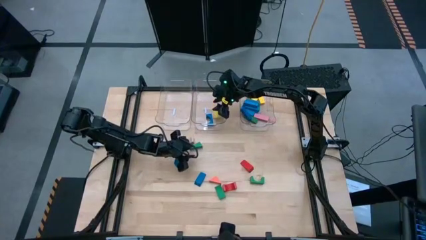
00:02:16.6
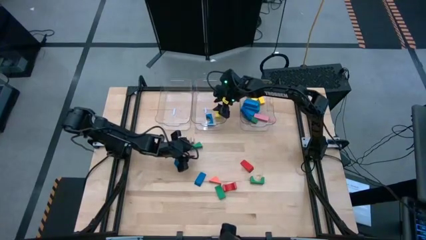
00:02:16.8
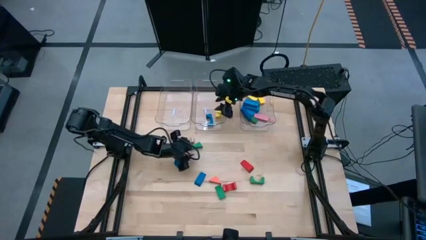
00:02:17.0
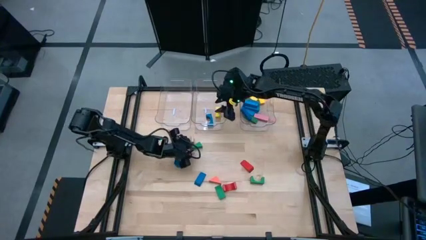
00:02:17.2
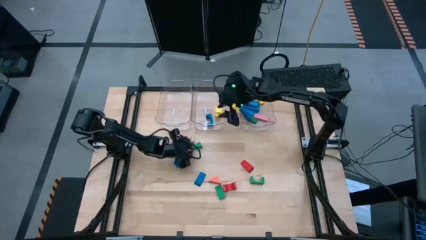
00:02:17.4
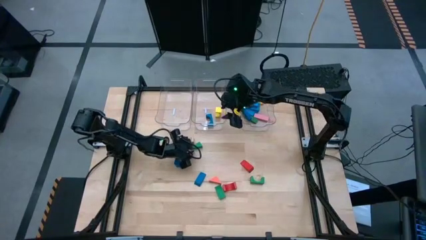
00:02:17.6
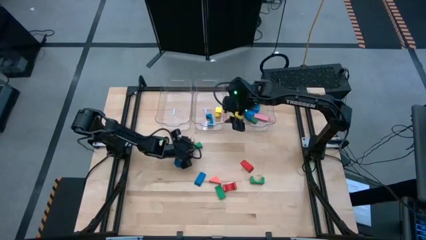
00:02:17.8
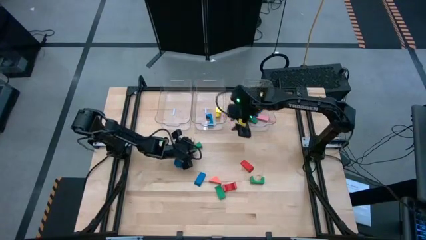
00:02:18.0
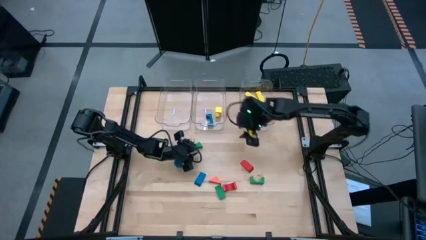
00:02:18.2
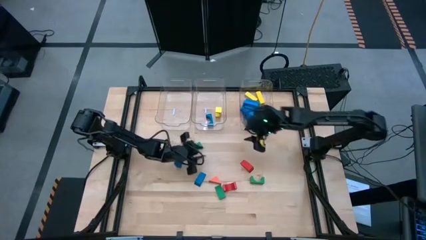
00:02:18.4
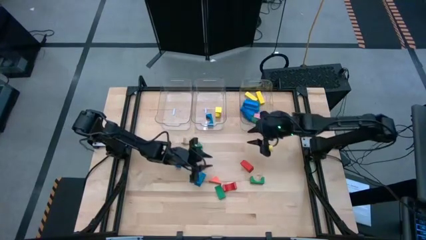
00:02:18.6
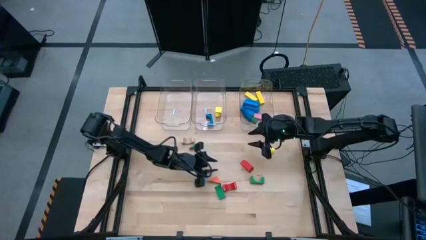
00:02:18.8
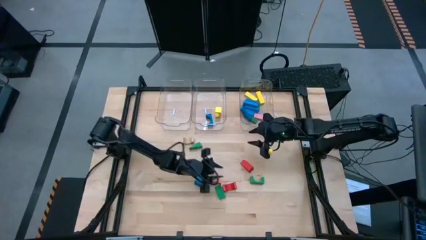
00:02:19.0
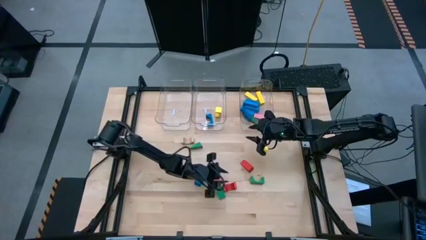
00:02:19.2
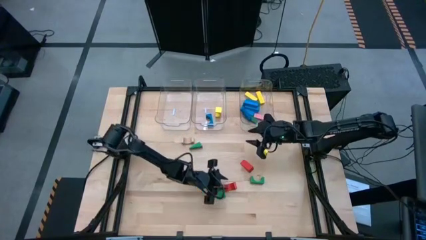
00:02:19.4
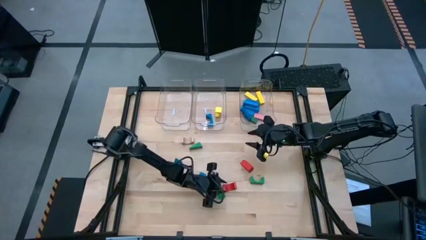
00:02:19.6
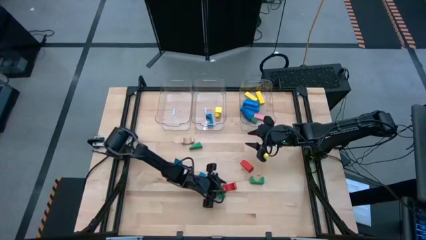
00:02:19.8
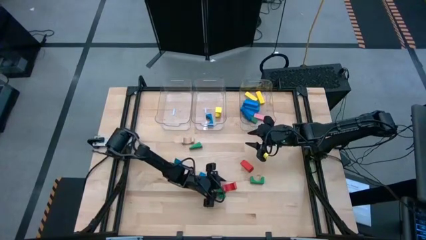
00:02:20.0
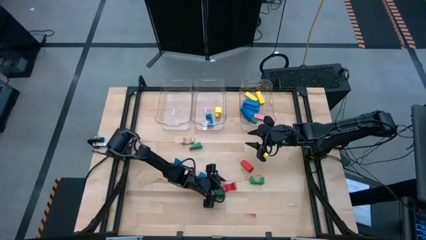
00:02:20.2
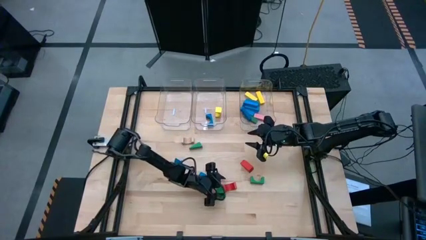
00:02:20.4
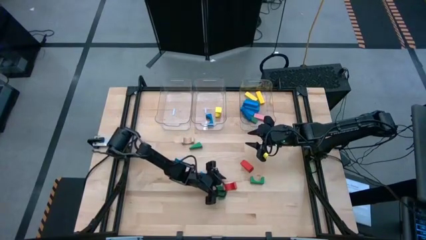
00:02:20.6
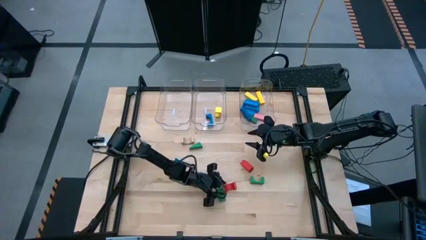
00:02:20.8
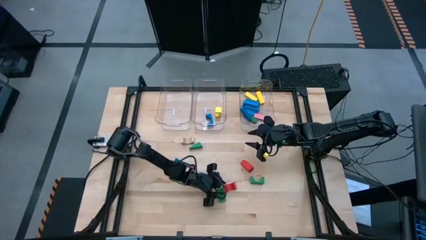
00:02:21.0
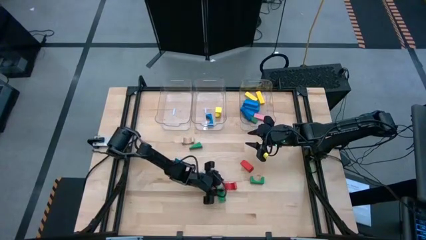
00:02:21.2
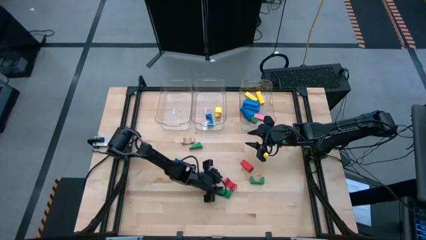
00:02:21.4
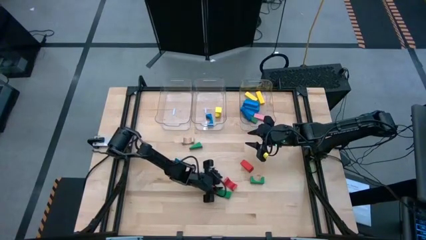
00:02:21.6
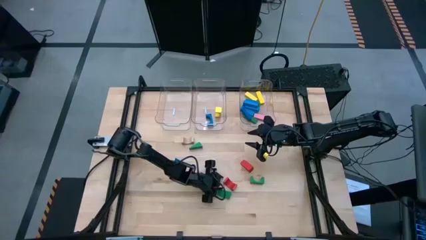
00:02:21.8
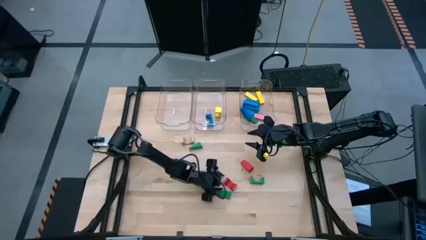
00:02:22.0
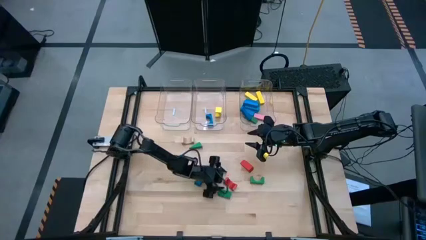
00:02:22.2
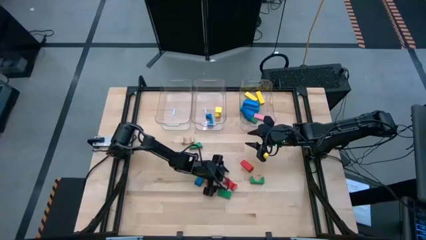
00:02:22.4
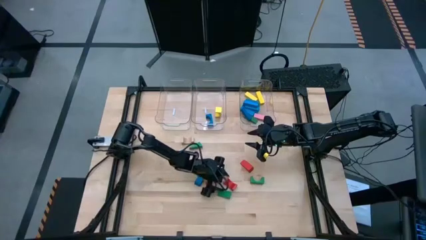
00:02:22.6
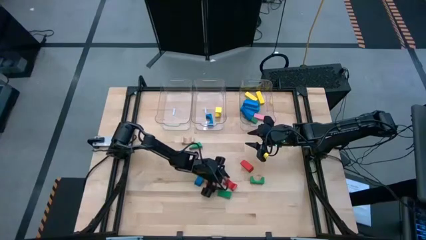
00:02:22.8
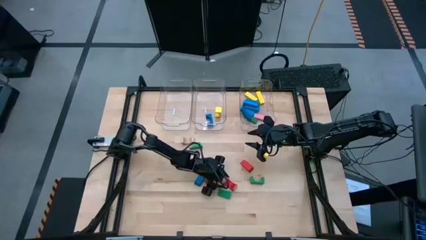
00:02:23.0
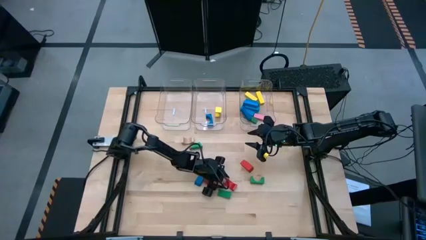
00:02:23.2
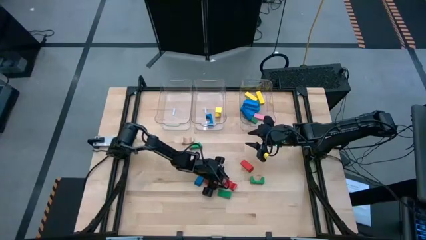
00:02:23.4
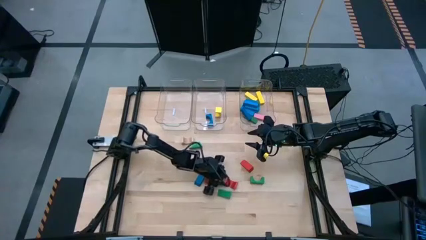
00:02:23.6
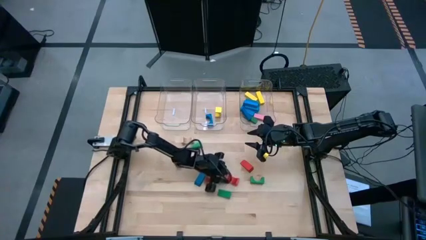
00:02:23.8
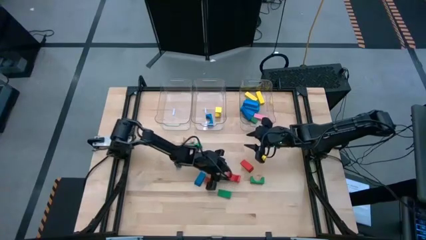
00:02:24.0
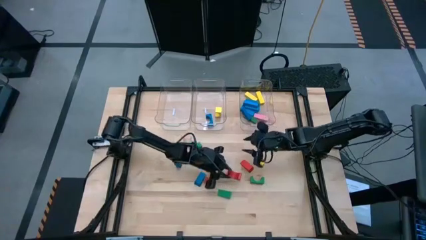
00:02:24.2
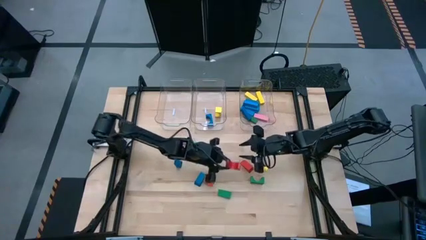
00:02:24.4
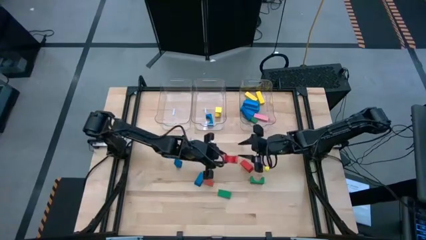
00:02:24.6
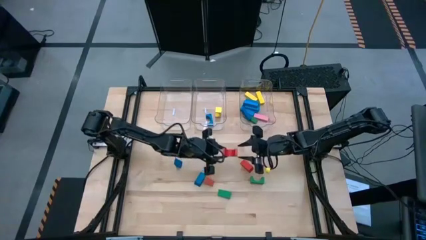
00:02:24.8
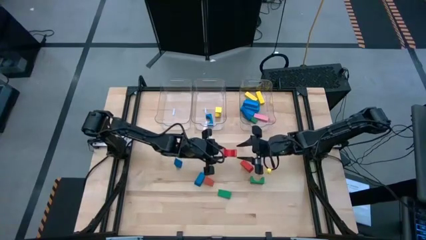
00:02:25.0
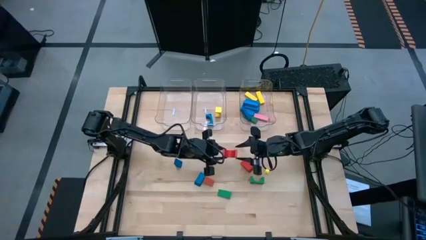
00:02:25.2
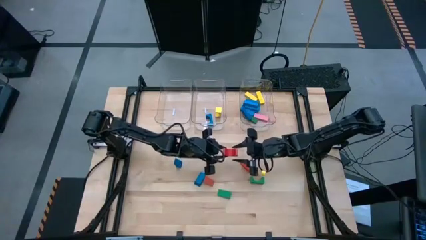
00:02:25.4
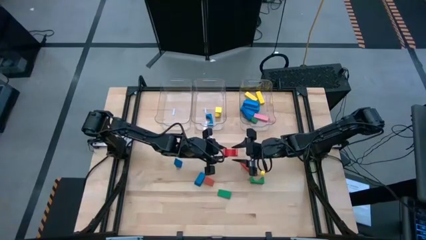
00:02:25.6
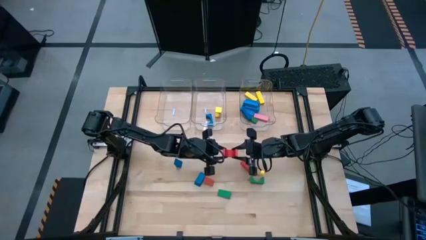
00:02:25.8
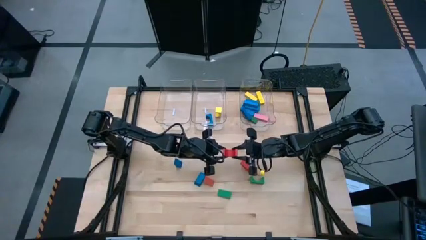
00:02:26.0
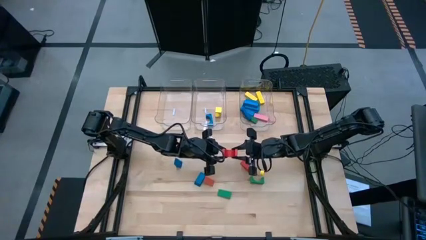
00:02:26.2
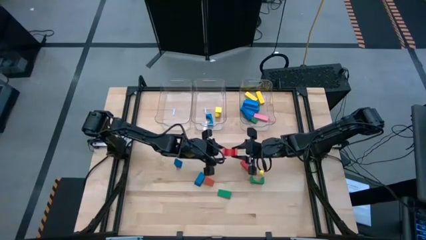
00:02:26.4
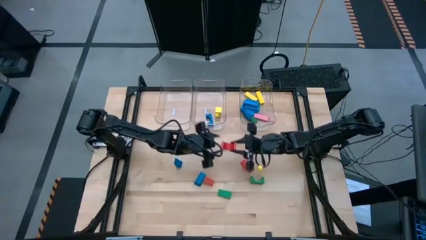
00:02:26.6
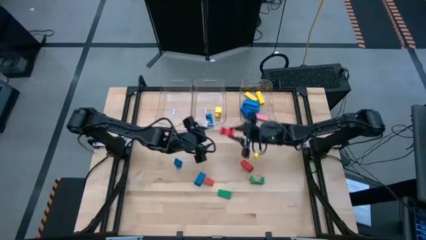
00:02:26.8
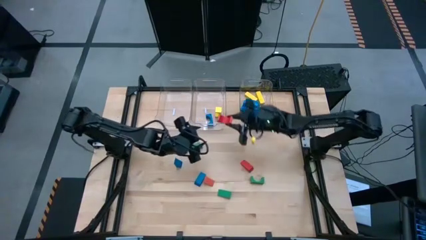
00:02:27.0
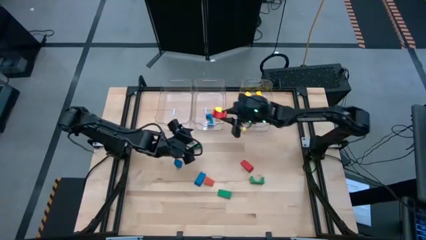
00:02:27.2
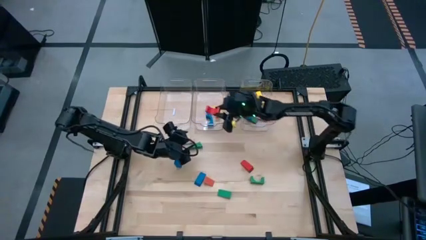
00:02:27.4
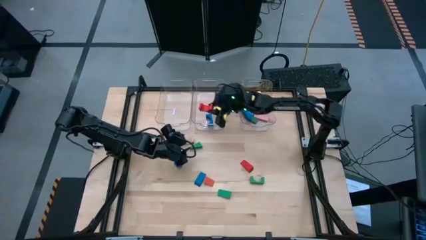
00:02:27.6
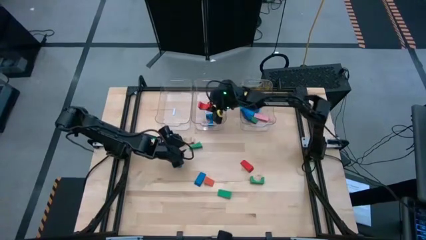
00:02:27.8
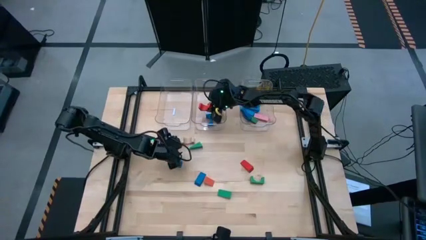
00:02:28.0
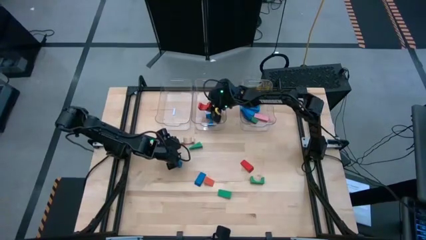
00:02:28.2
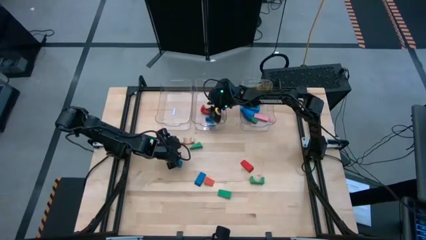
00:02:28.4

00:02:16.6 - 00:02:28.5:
Task: Sort blocks by size
Put the red arch block into the center transparent bin

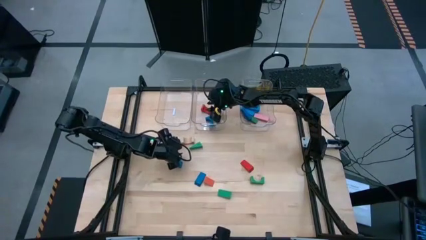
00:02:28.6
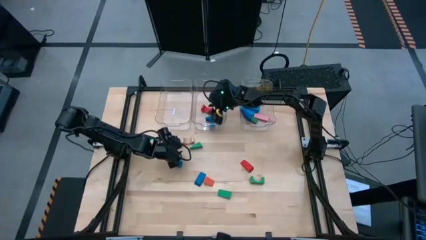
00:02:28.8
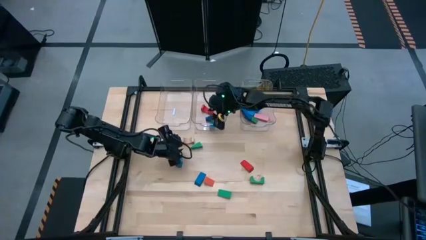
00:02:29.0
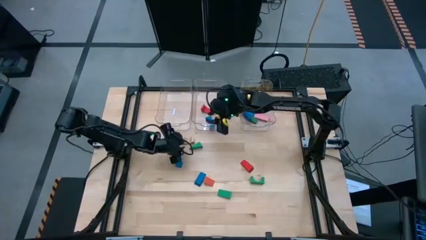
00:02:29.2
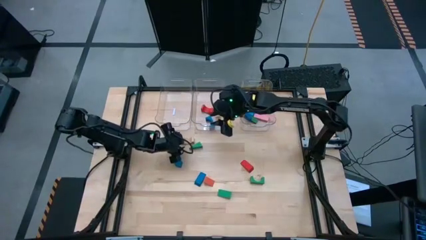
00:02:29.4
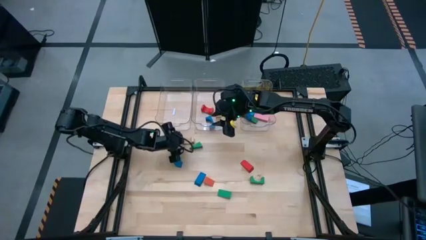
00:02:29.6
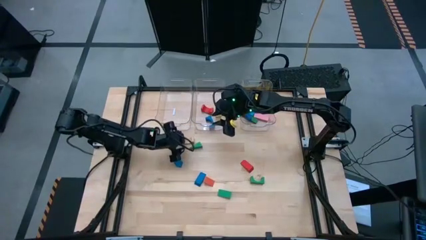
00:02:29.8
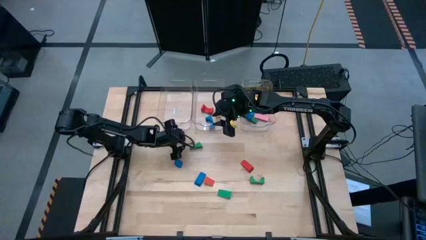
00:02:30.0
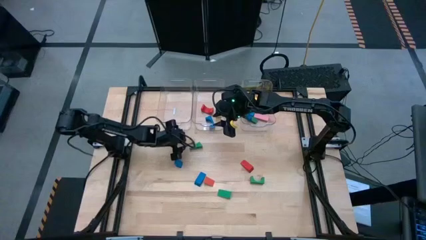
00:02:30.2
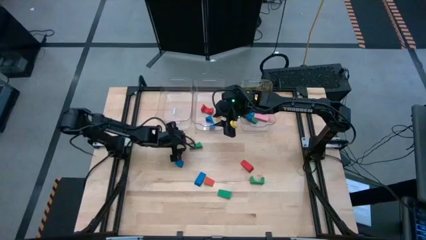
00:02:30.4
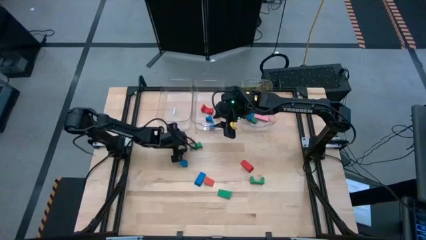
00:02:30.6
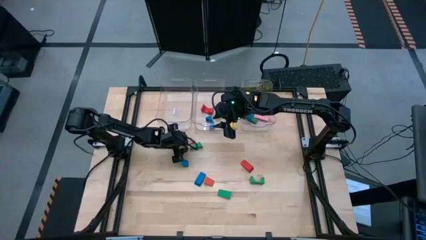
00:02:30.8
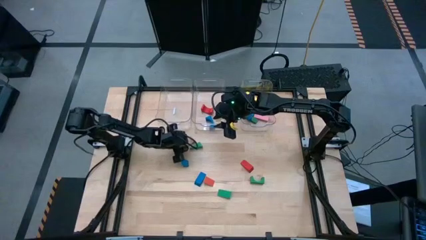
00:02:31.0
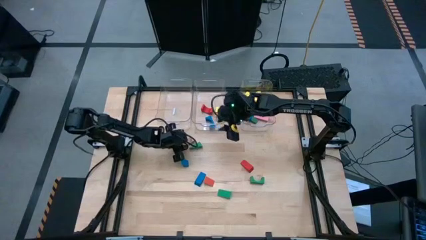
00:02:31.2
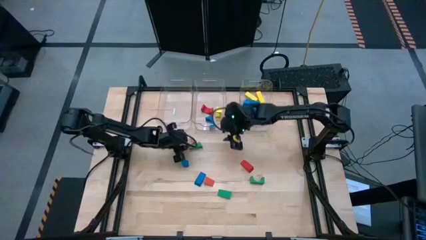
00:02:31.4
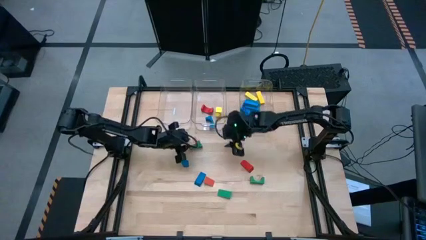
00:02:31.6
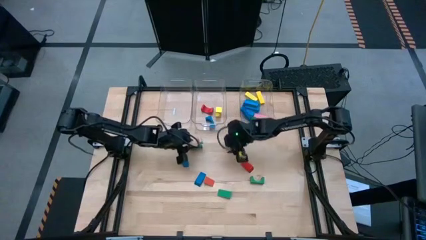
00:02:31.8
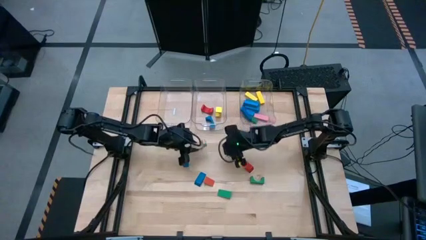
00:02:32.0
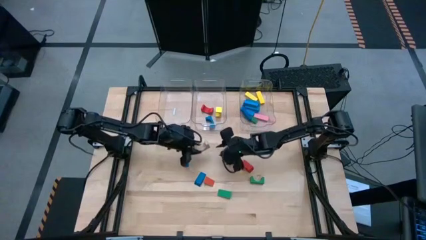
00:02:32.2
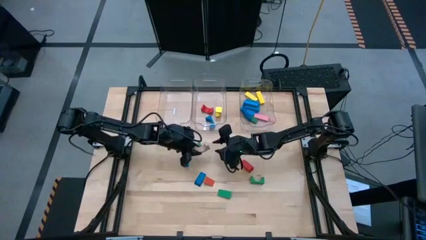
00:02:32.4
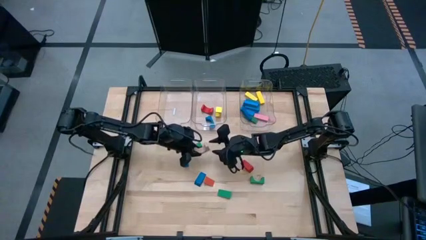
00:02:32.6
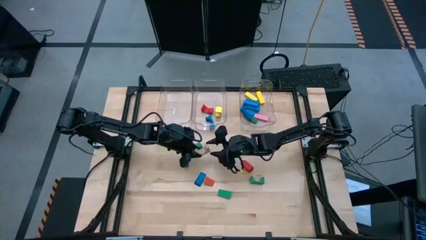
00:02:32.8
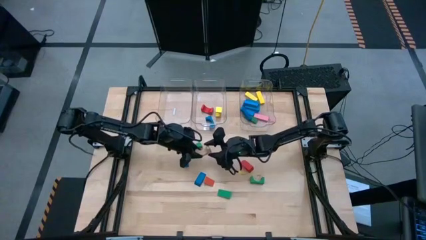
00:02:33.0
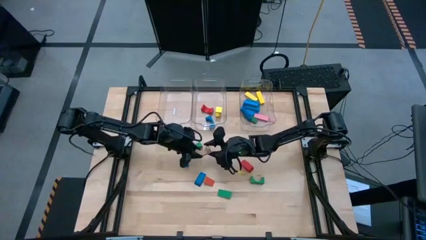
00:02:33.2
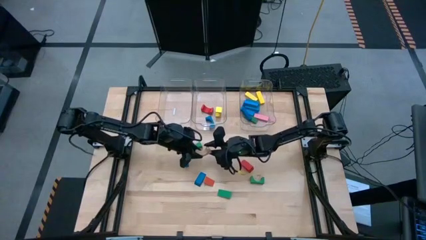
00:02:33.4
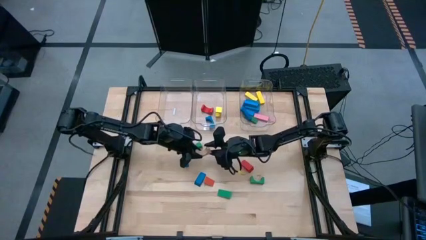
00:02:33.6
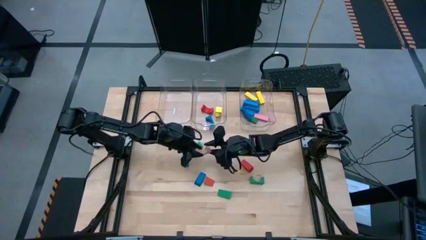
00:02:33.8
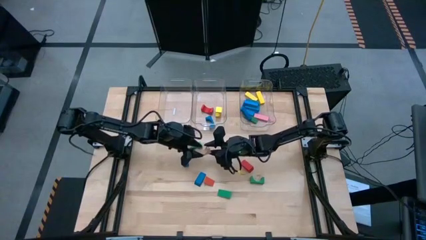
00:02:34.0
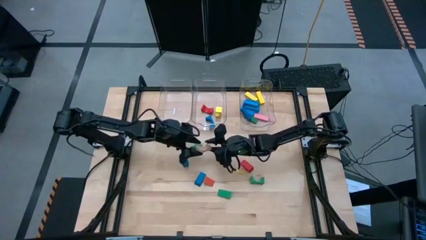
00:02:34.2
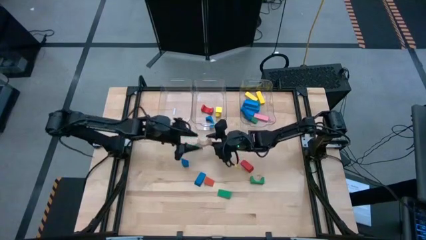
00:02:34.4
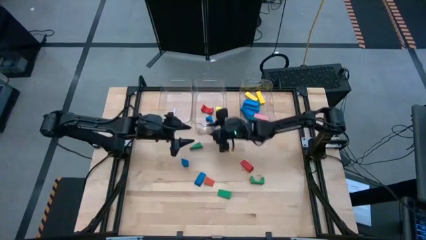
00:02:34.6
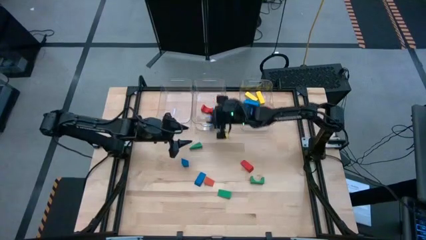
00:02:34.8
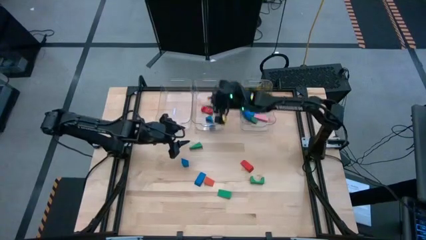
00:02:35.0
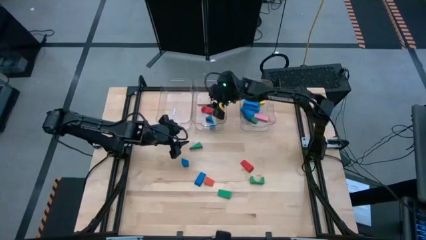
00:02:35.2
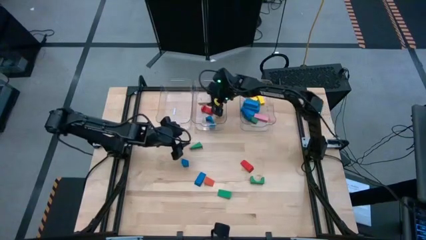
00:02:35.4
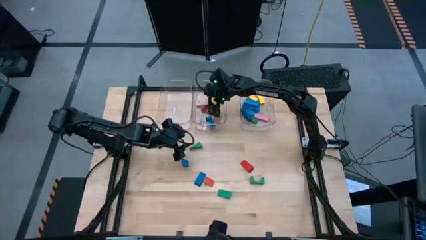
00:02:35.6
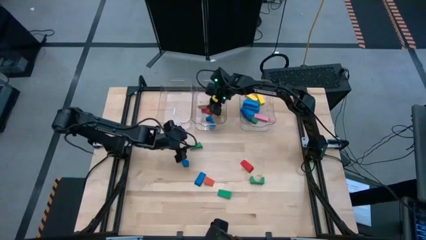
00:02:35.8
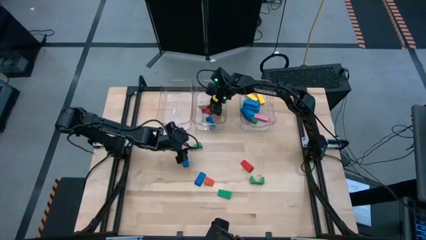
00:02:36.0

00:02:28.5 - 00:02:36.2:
Put the brown arch block into the center transparent bin
